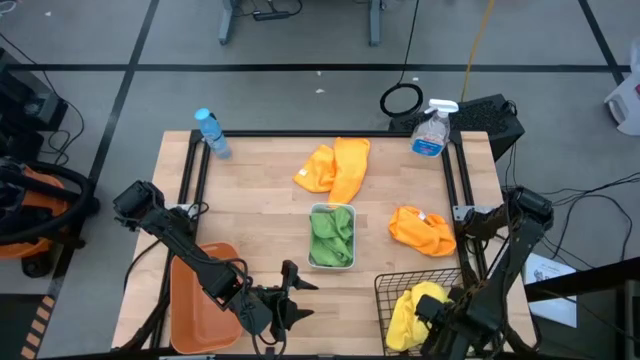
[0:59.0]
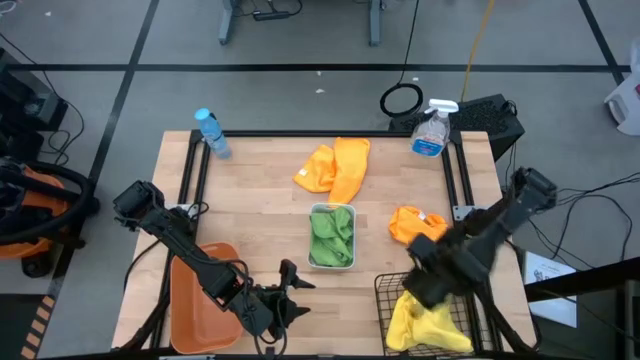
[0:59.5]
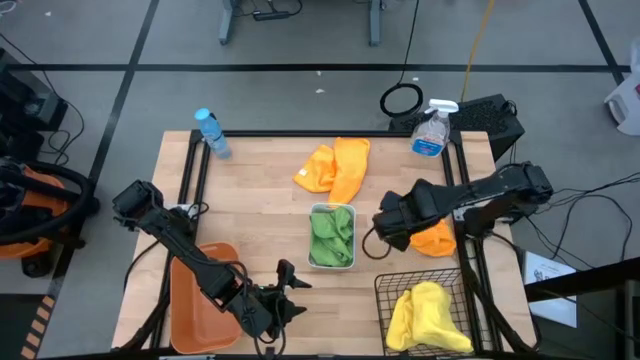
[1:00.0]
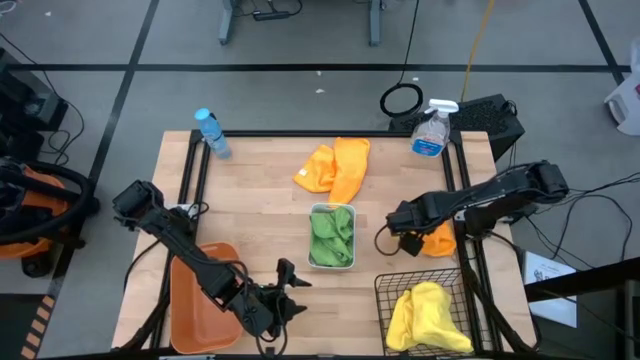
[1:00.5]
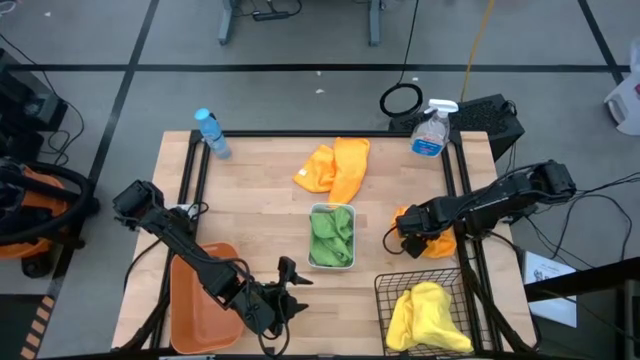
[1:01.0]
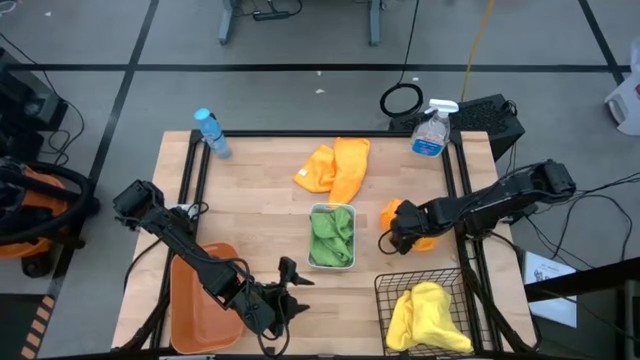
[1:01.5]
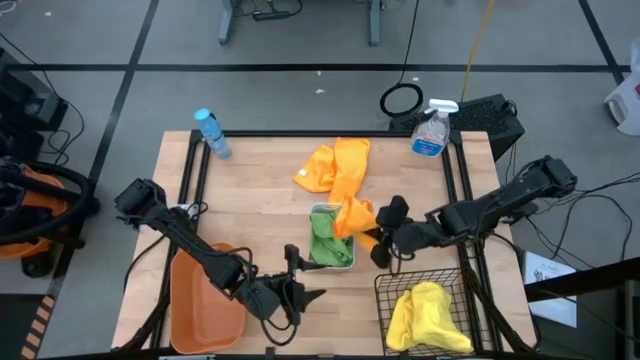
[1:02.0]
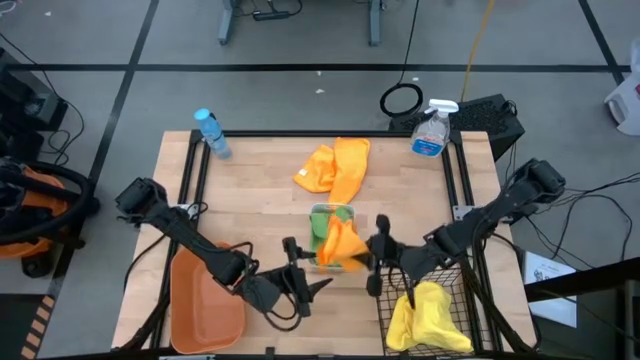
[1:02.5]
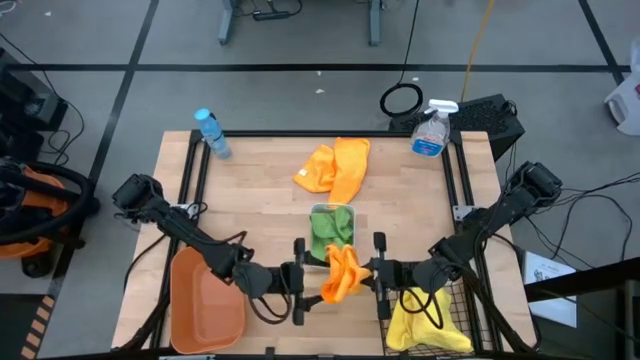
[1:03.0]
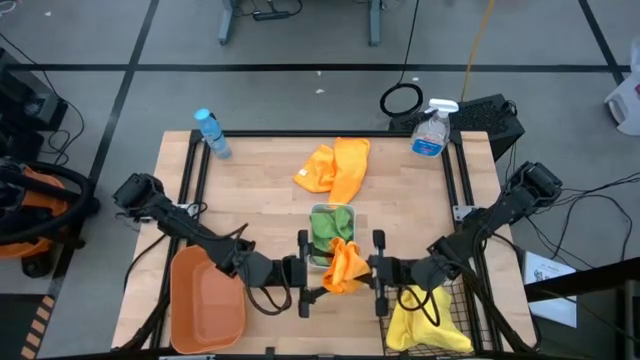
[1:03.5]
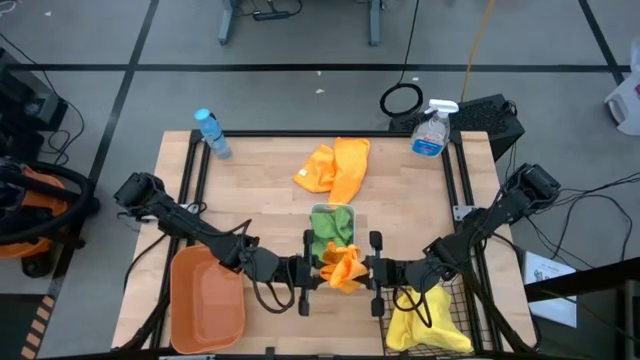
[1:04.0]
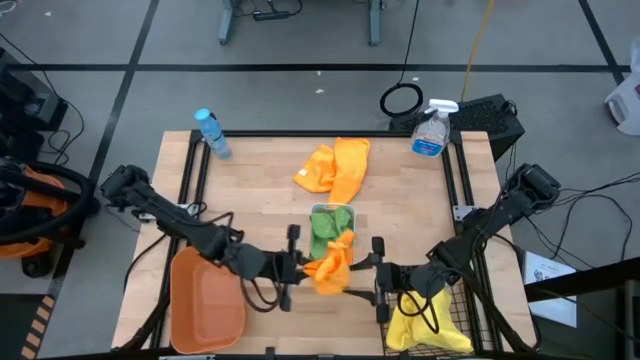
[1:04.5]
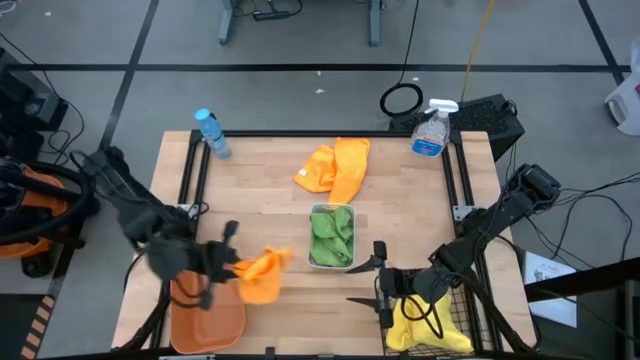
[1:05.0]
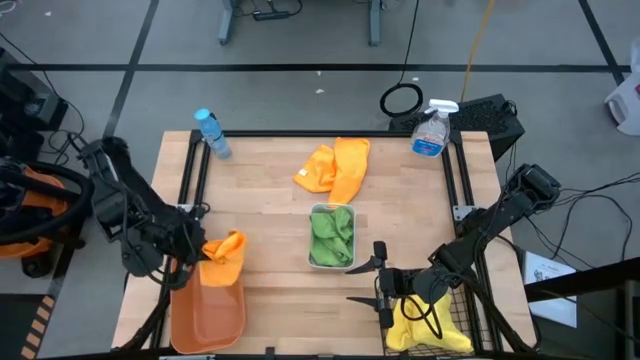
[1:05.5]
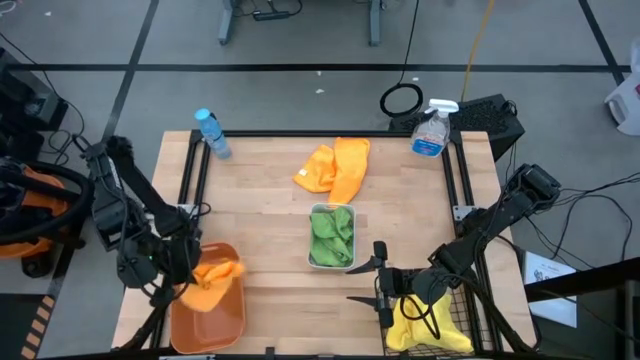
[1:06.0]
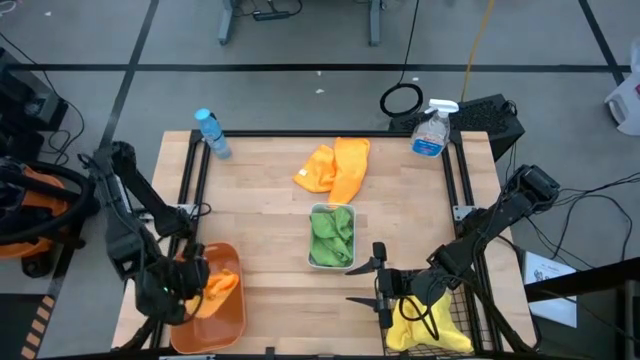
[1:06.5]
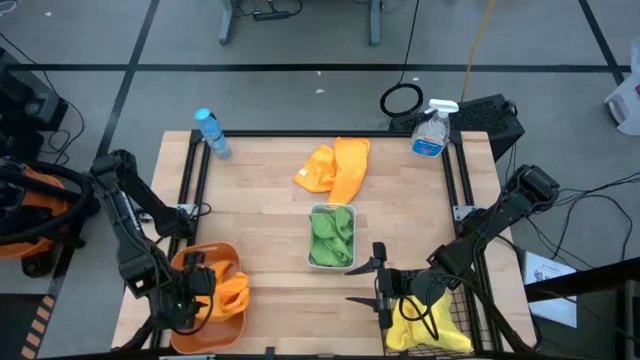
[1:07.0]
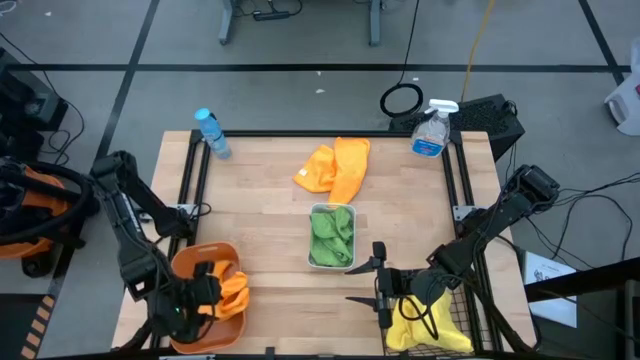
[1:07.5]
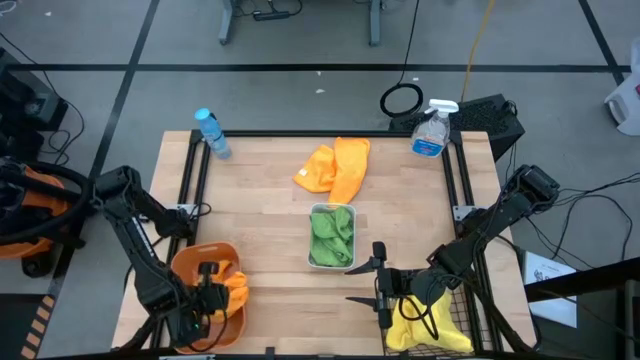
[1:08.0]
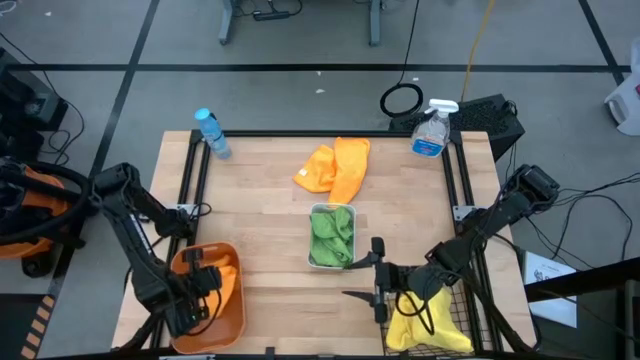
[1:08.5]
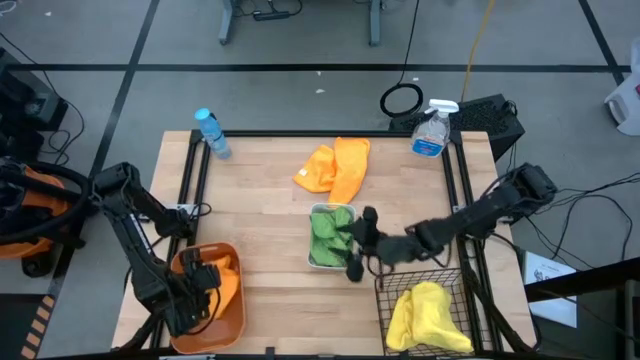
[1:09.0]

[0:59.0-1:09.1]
Task: Sort microfiber towel by color & place in baskets
Put the right orange microfiber towel into the orange bin

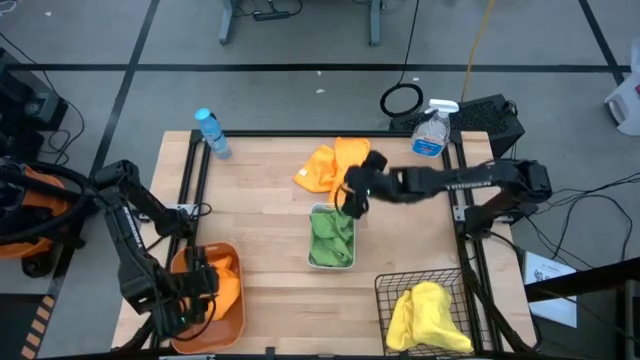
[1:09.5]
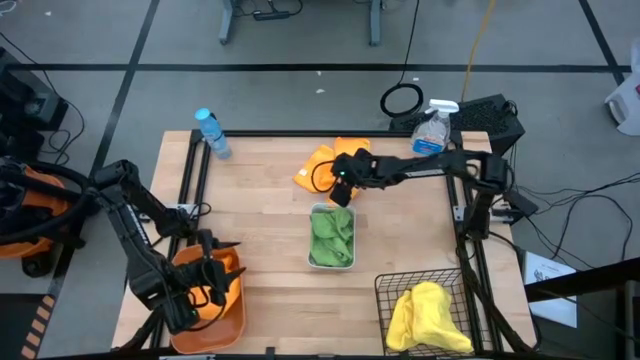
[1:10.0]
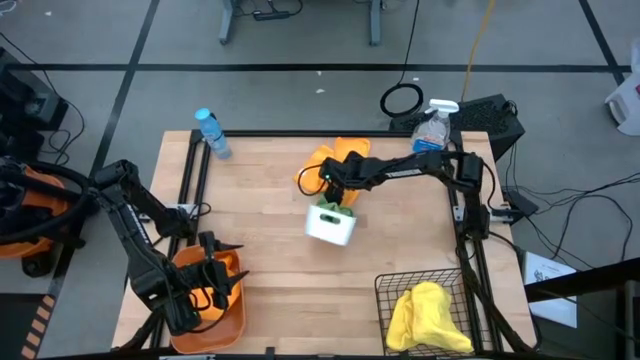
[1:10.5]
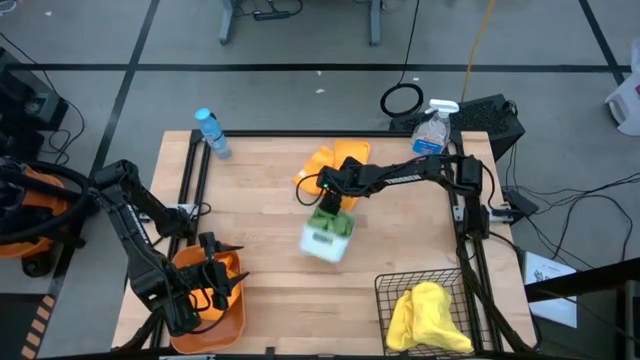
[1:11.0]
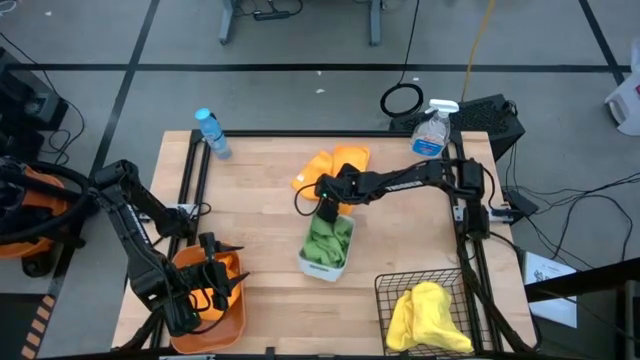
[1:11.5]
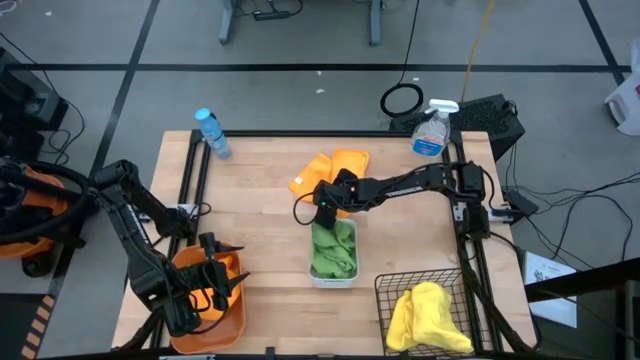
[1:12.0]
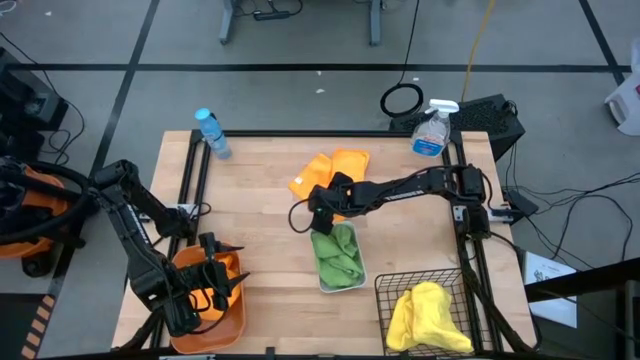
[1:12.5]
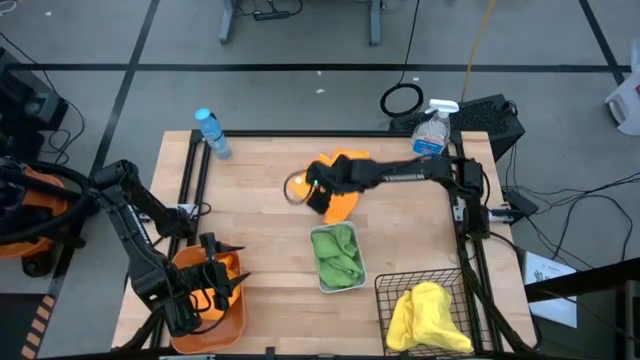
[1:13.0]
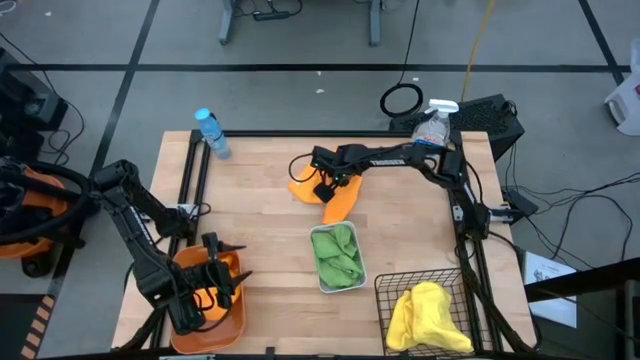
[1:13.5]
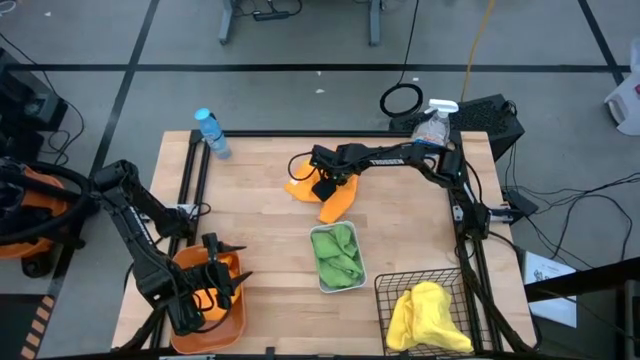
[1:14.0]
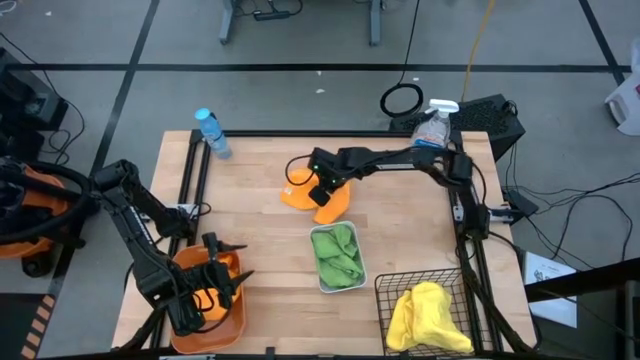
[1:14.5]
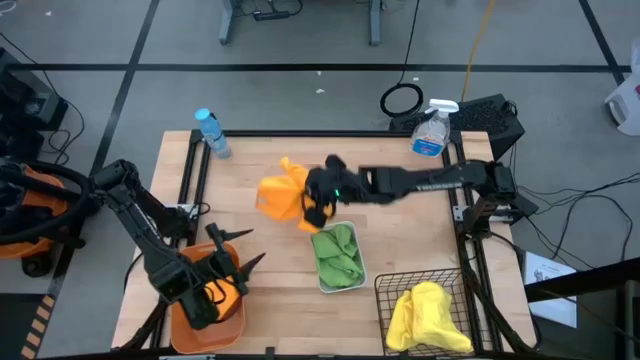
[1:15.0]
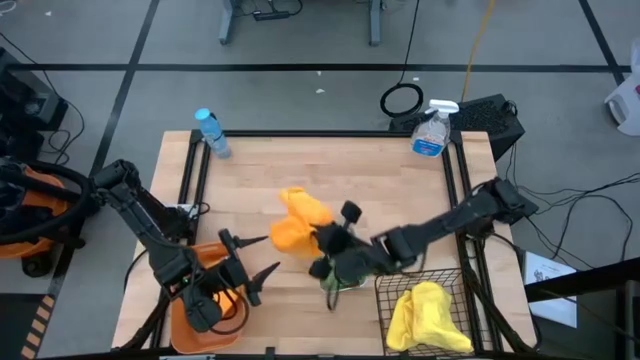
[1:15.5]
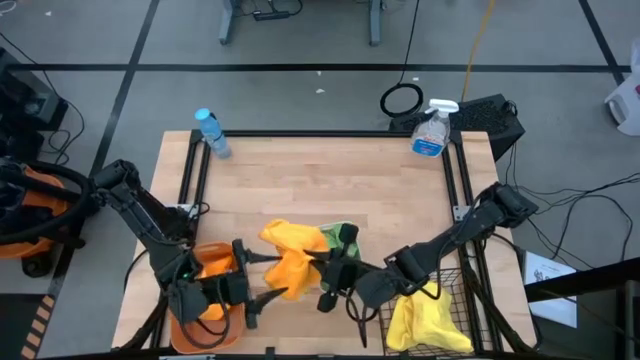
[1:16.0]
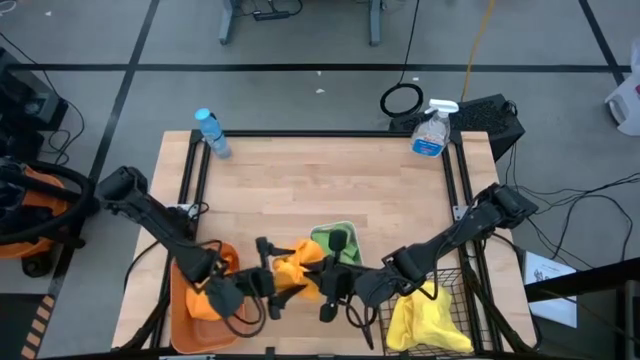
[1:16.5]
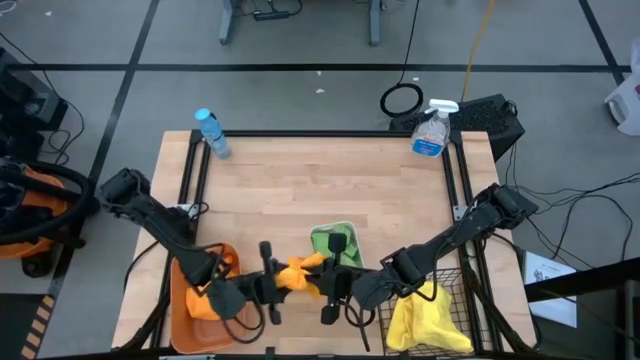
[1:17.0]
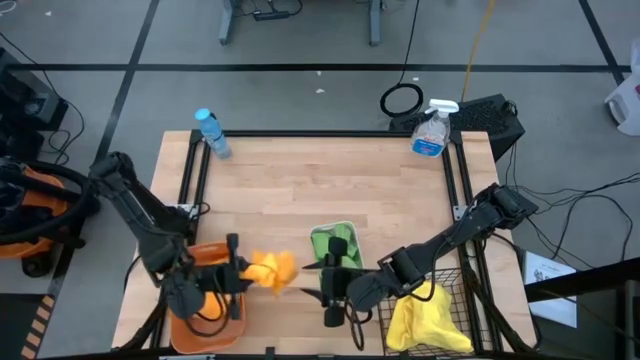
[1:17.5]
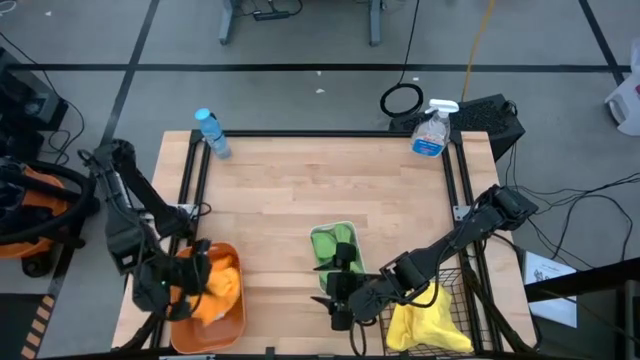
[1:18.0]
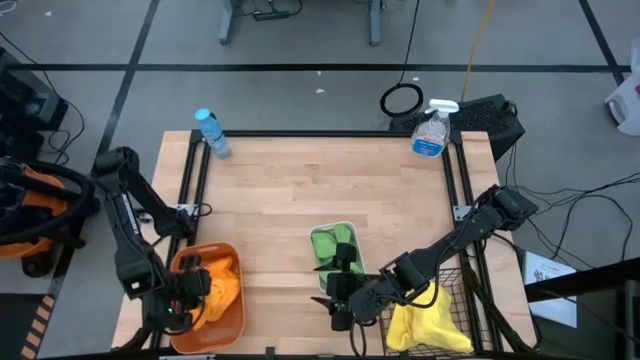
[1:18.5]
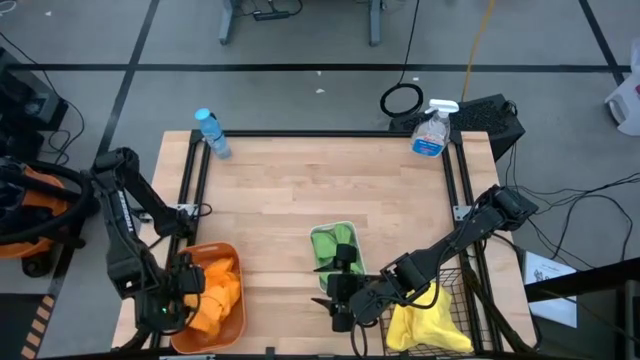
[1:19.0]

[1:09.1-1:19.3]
Put the orange microfiber towel into the orange bin
